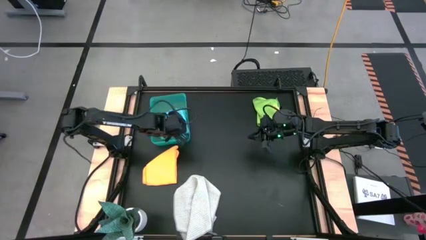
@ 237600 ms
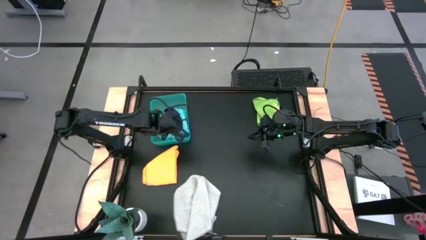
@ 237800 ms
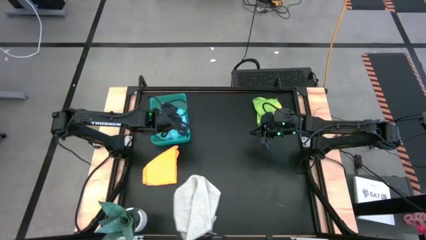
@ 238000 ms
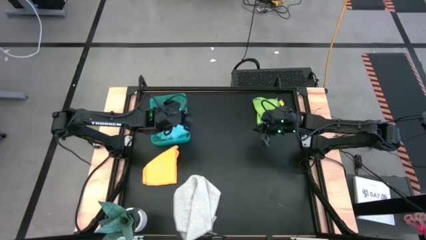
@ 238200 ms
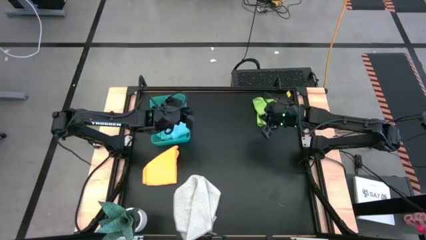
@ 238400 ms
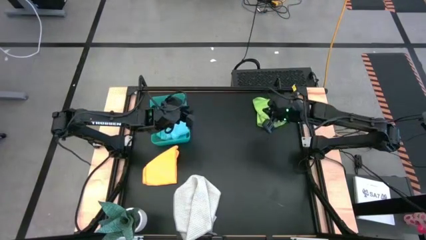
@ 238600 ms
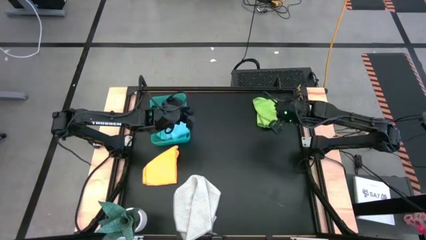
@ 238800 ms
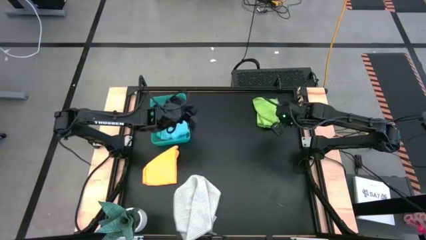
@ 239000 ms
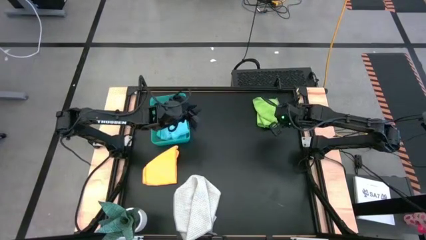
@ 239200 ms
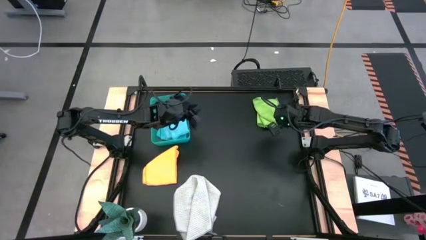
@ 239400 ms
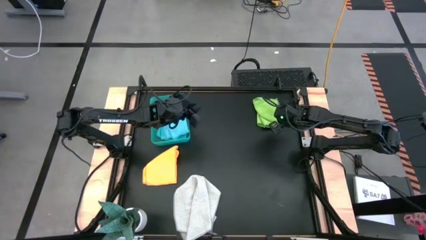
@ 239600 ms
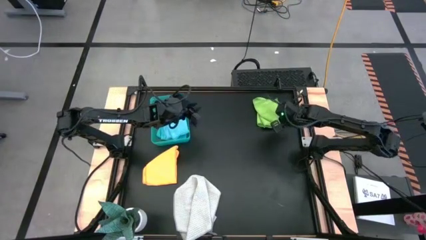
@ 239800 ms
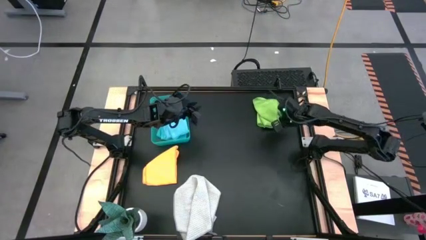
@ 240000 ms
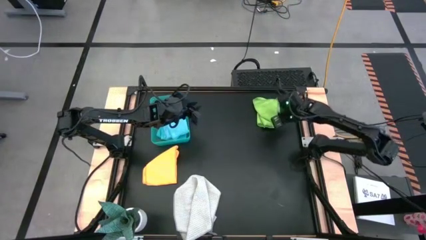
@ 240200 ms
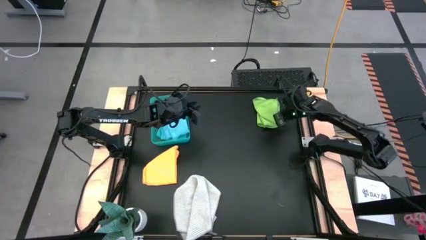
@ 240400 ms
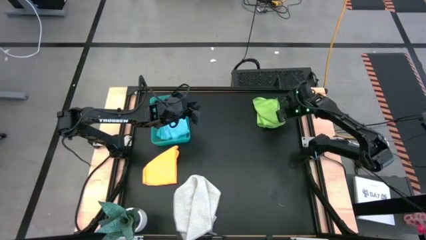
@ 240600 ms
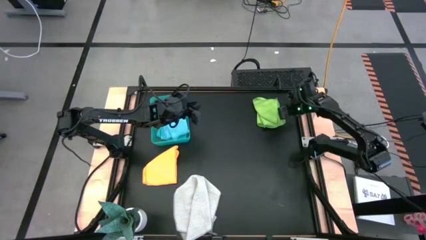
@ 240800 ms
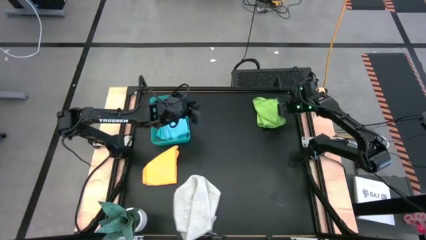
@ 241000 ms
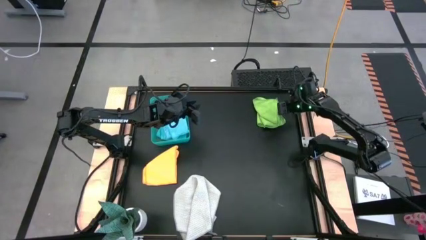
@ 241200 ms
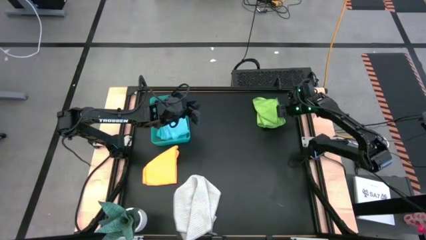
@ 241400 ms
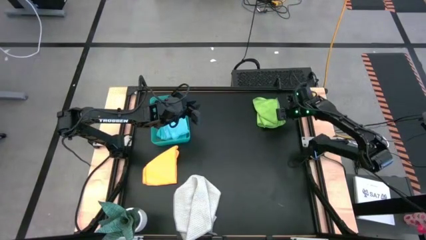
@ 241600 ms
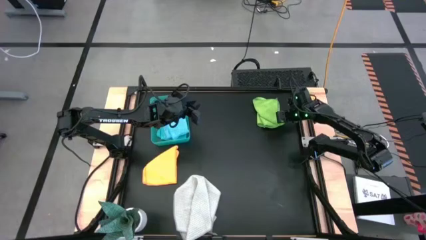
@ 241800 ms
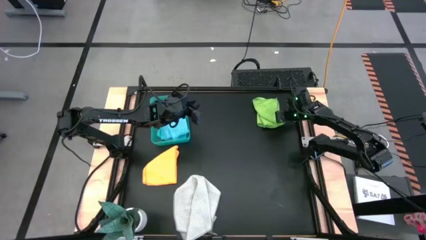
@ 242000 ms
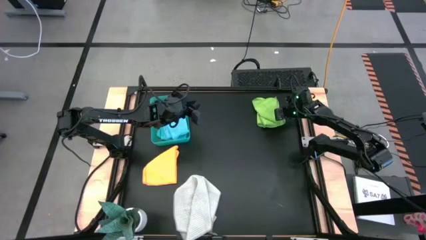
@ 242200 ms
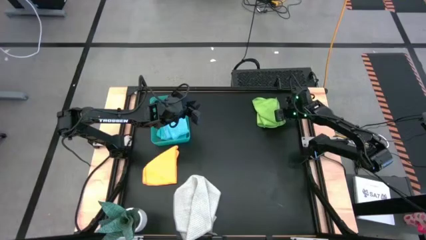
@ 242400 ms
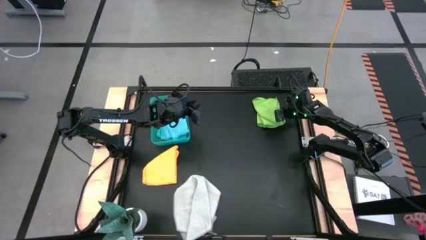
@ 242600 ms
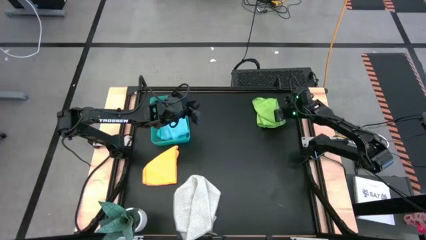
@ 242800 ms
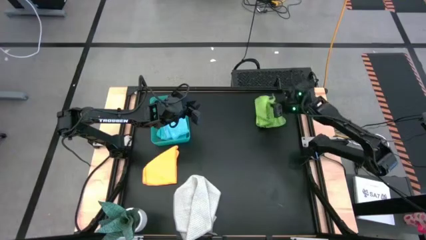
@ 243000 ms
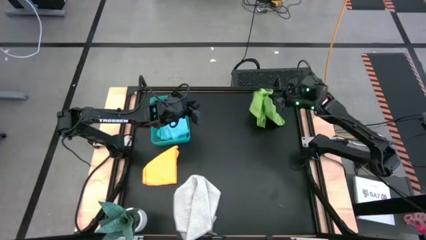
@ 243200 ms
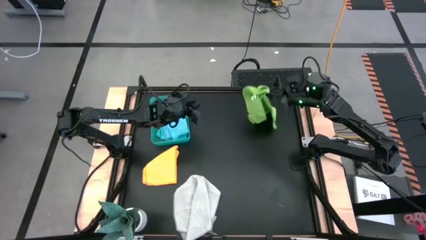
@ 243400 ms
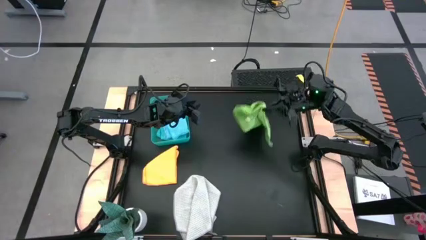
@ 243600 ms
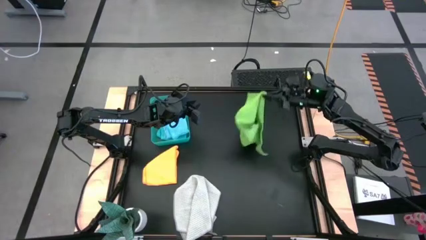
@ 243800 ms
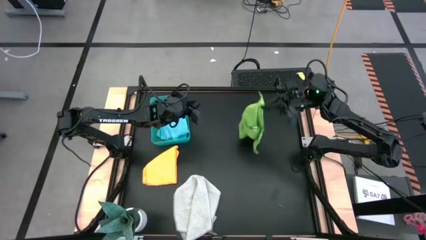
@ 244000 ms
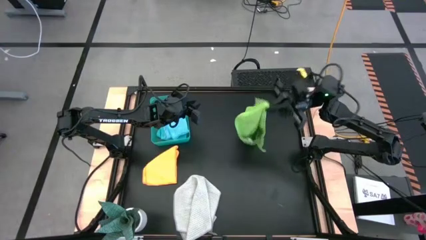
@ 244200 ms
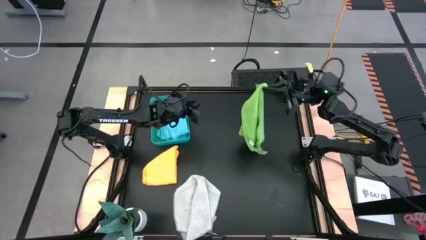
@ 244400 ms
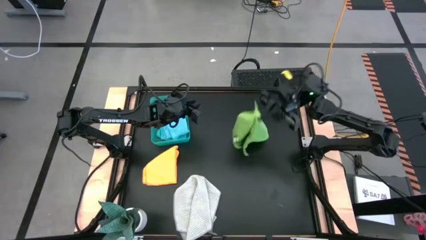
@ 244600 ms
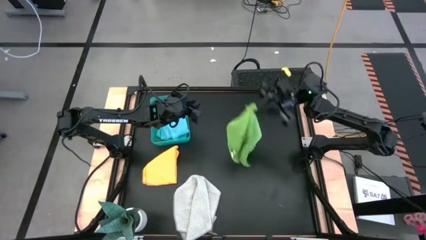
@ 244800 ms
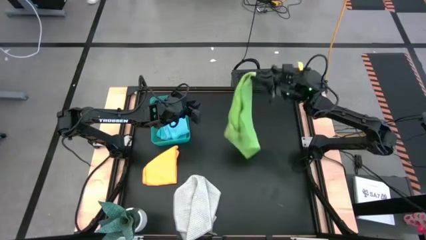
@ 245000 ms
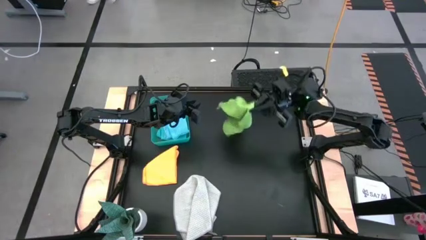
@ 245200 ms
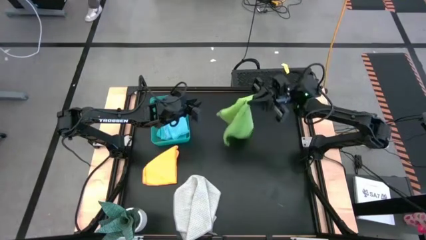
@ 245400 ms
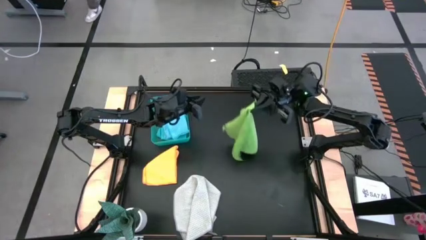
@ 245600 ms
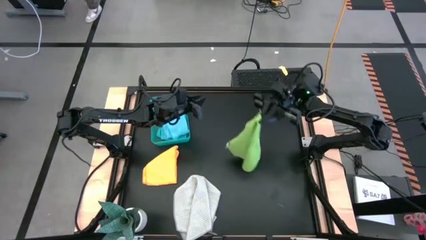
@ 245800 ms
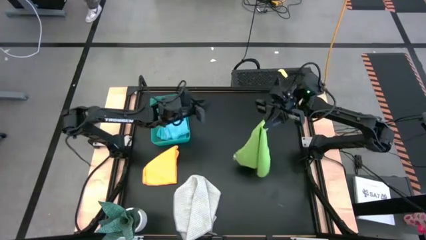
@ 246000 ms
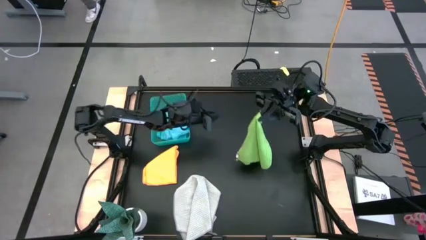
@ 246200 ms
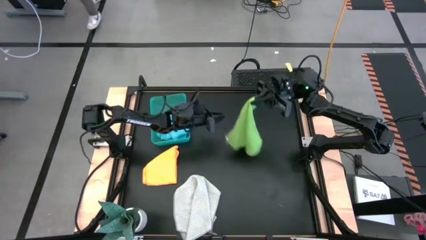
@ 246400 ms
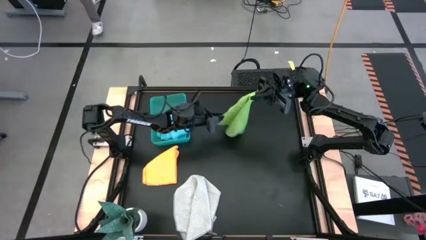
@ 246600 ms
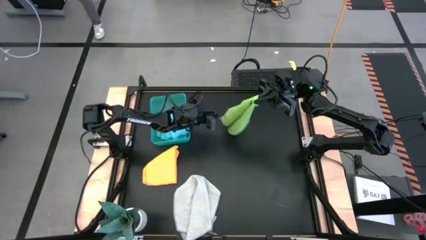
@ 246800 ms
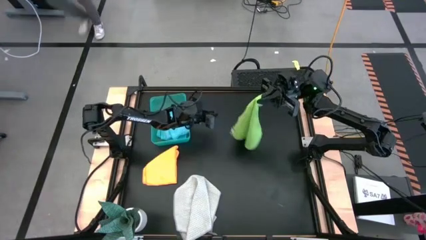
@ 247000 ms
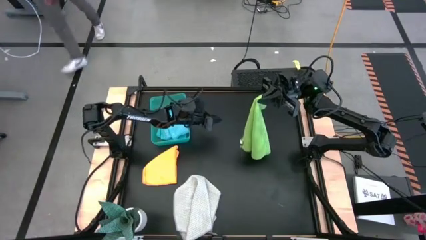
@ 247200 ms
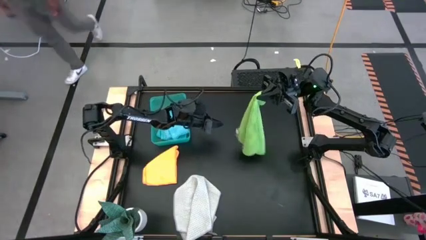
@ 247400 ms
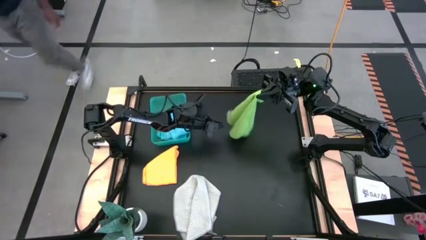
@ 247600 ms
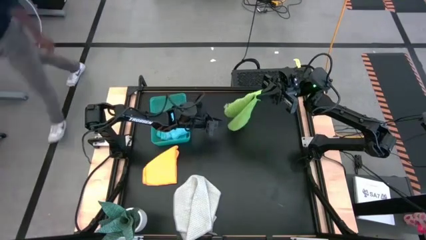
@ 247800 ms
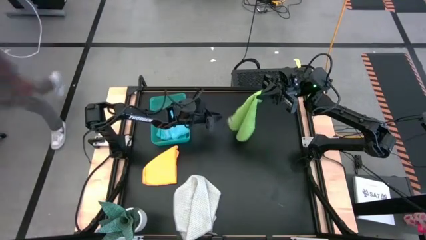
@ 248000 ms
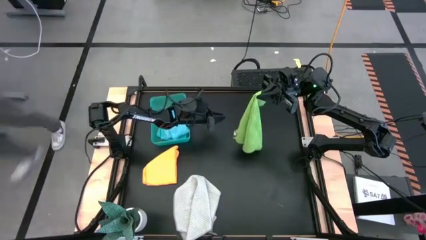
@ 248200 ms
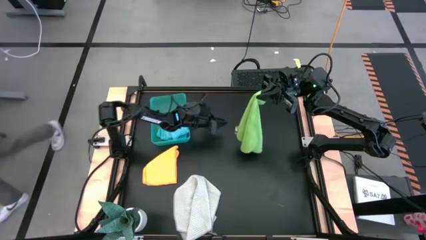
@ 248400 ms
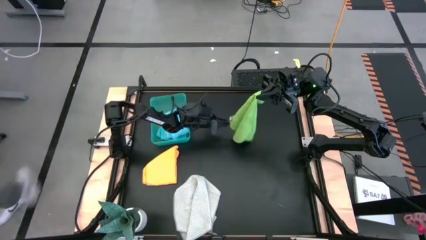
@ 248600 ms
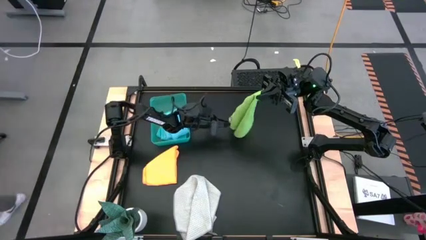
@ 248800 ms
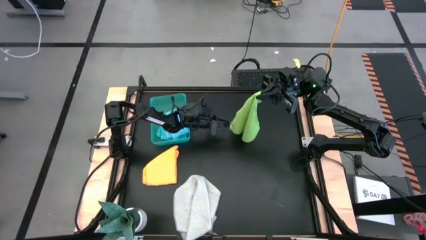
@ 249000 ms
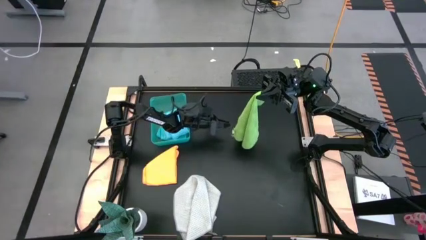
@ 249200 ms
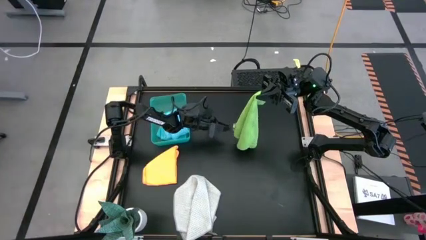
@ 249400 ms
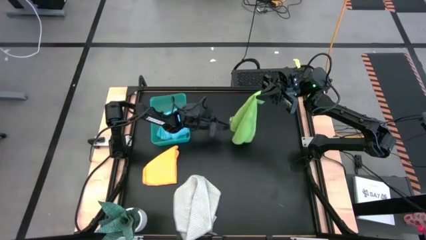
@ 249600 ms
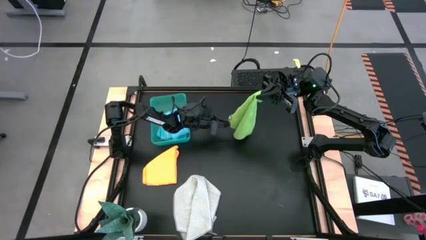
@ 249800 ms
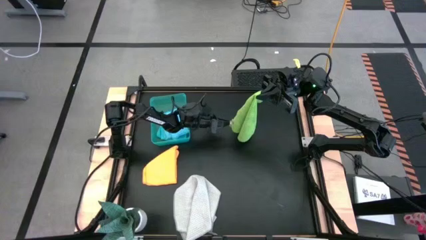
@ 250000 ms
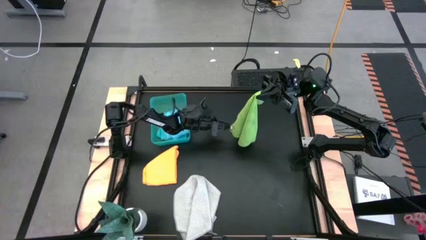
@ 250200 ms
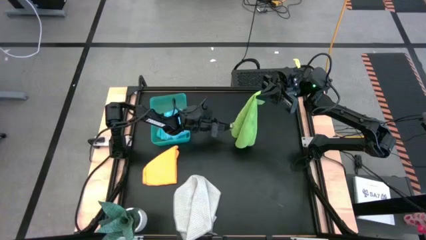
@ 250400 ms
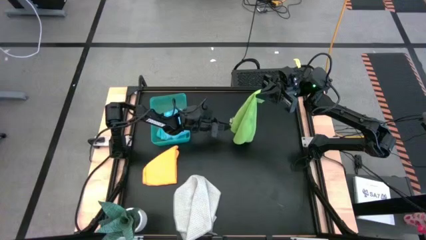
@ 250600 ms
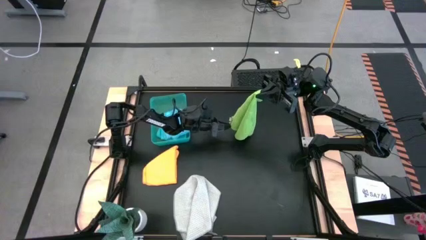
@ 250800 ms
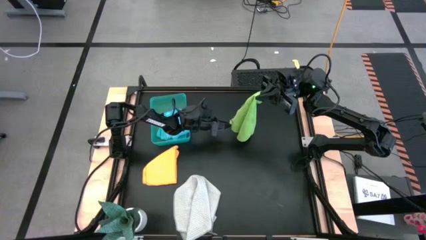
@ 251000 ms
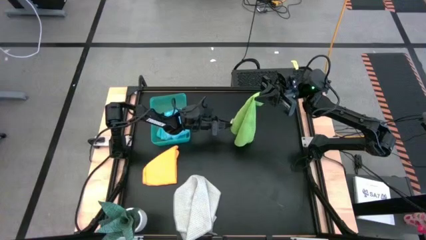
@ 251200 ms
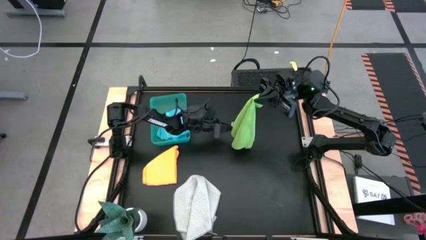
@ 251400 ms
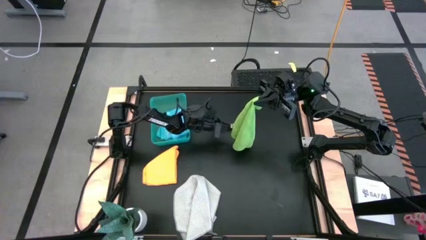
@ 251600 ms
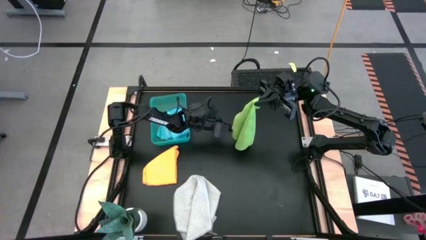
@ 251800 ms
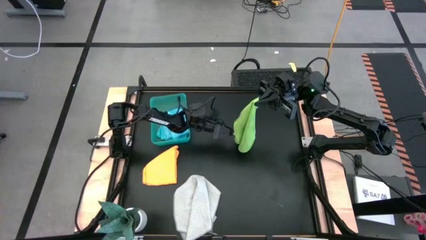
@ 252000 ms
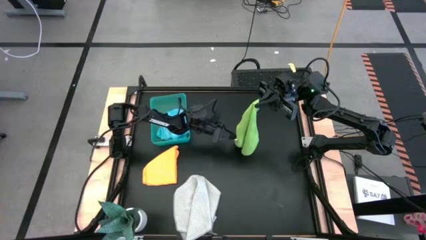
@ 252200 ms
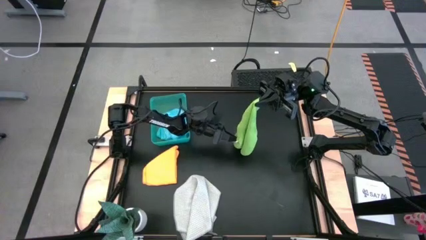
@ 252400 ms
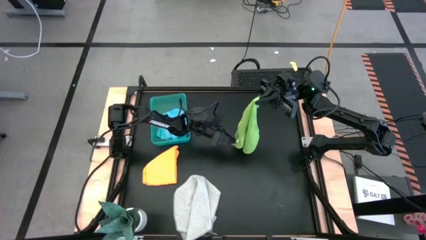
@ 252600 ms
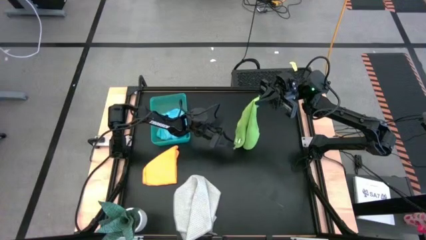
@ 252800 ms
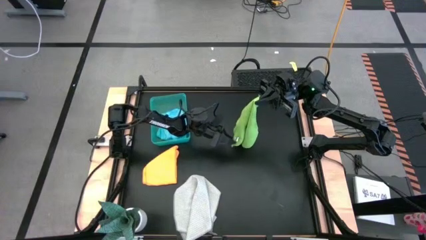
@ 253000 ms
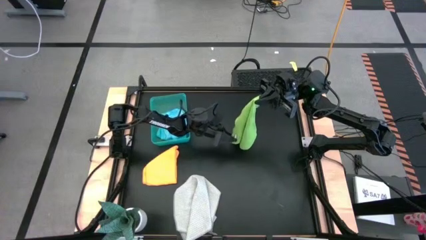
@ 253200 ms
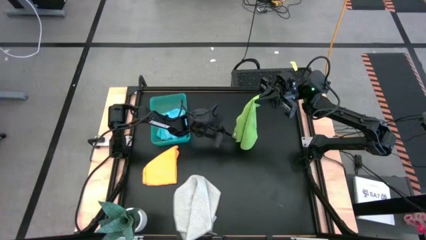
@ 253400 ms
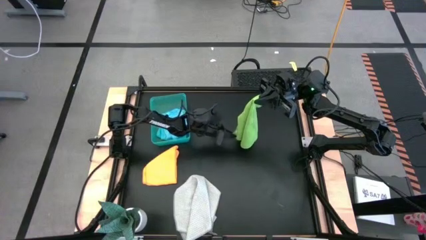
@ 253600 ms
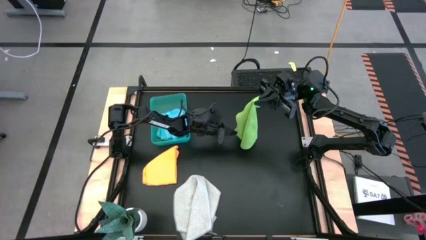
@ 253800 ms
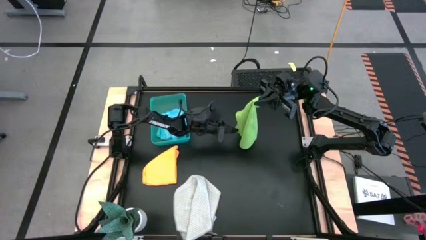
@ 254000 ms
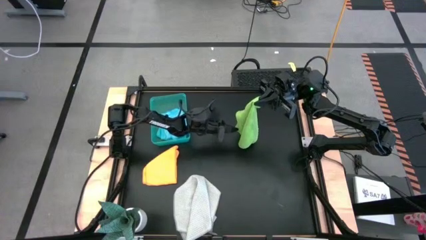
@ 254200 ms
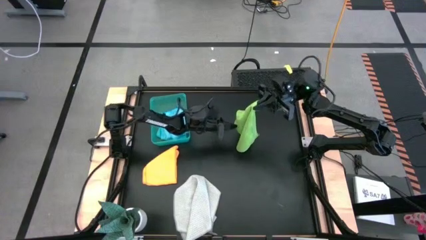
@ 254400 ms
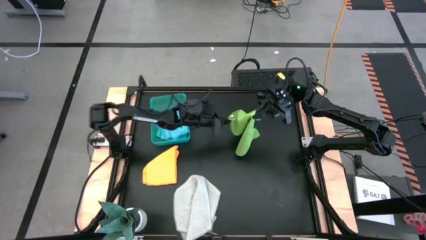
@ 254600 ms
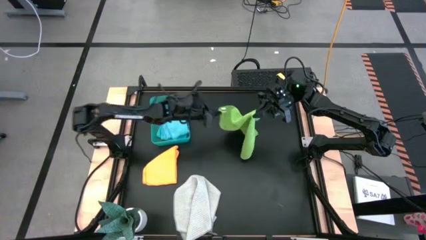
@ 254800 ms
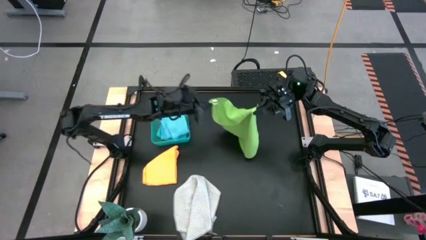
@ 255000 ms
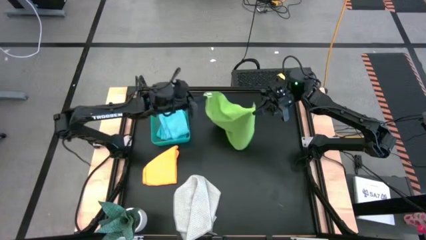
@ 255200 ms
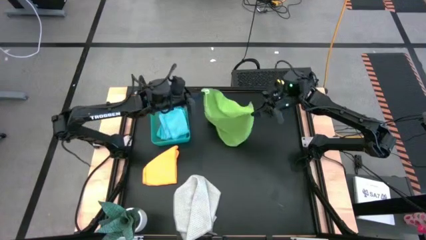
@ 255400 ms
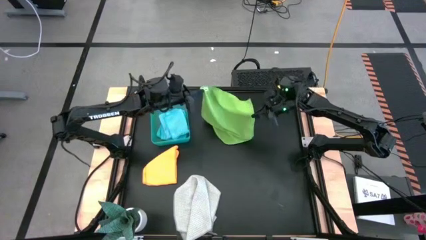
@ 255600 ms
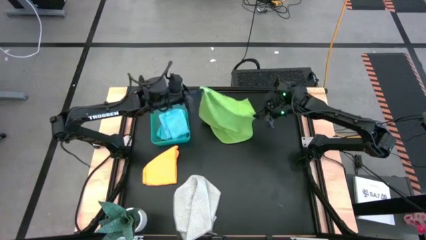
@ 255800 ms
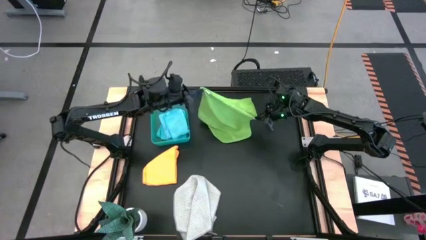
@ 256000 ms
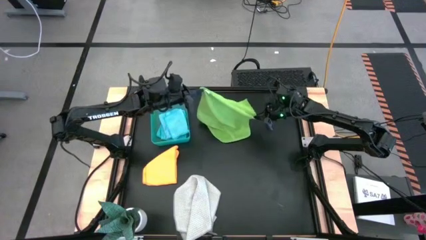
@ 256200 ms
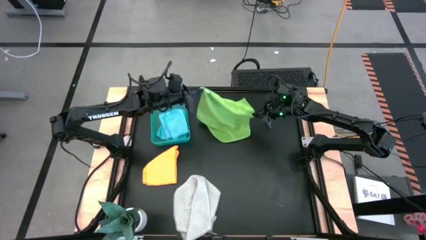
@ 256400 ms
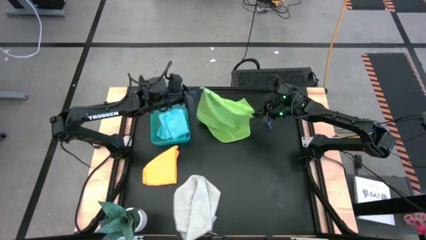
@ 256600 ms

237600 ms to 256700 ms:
Task: Fold microfiber towels
Fold the green microfiber towel
